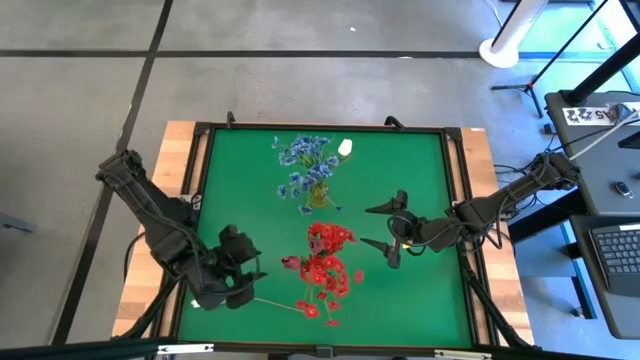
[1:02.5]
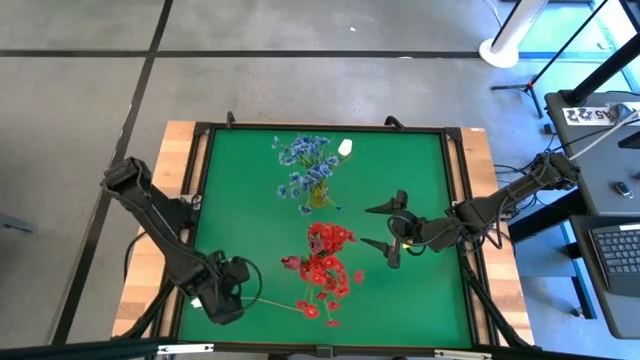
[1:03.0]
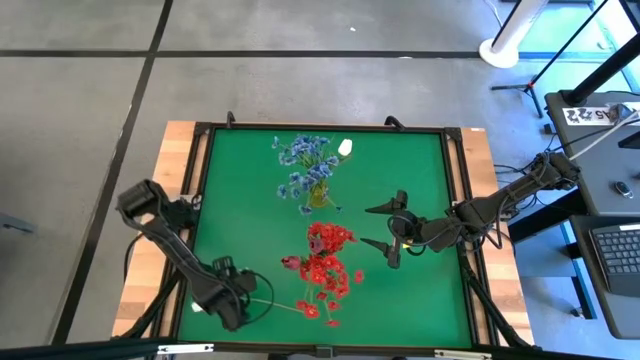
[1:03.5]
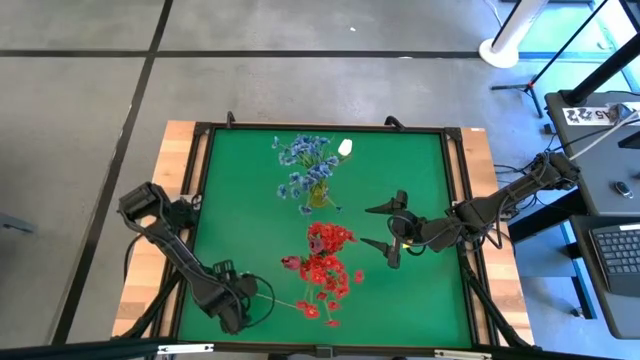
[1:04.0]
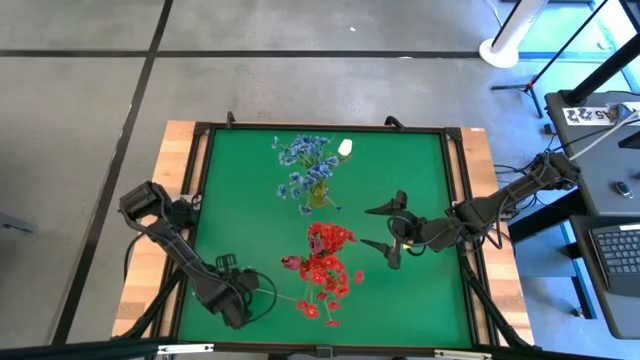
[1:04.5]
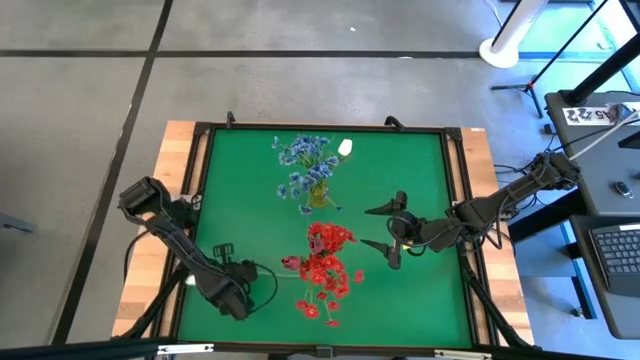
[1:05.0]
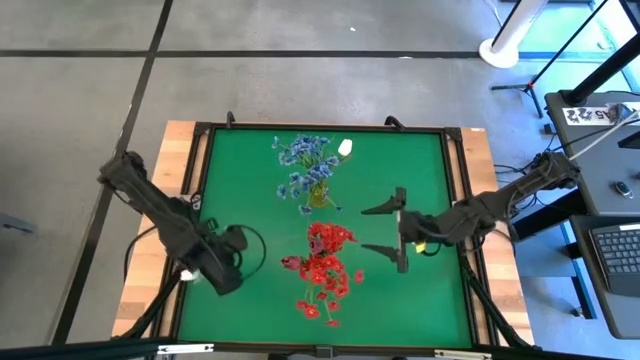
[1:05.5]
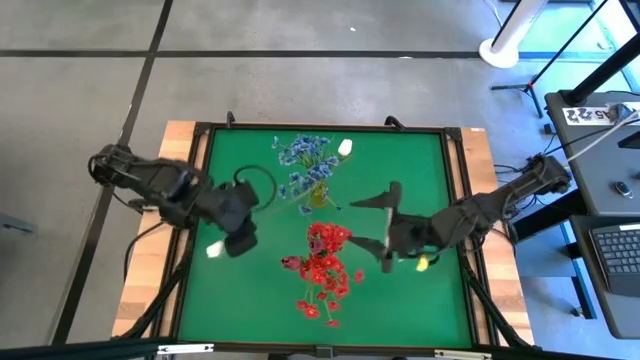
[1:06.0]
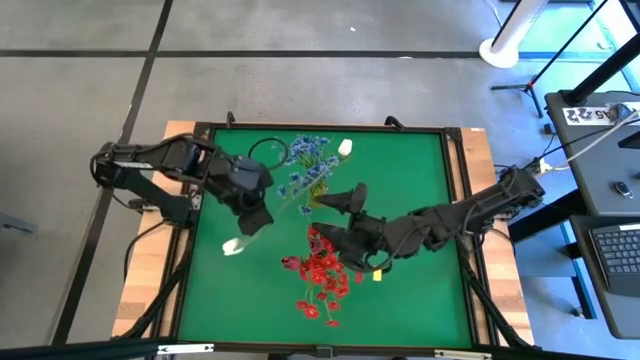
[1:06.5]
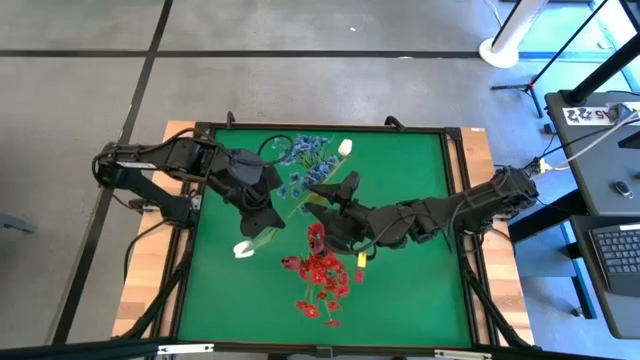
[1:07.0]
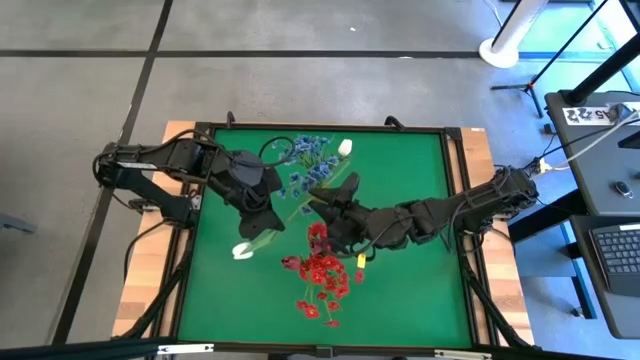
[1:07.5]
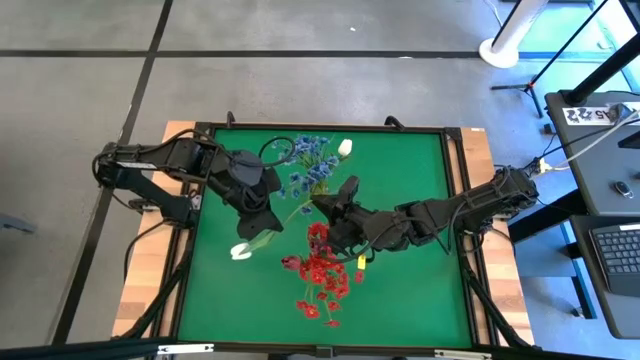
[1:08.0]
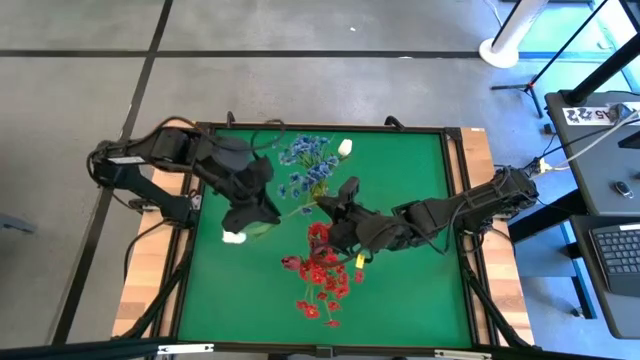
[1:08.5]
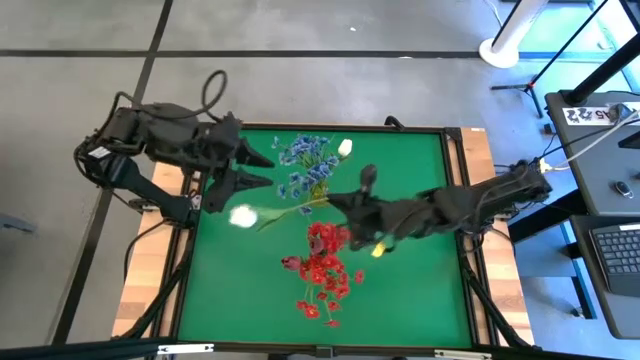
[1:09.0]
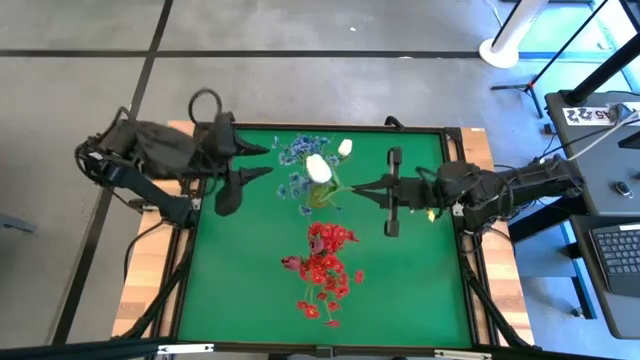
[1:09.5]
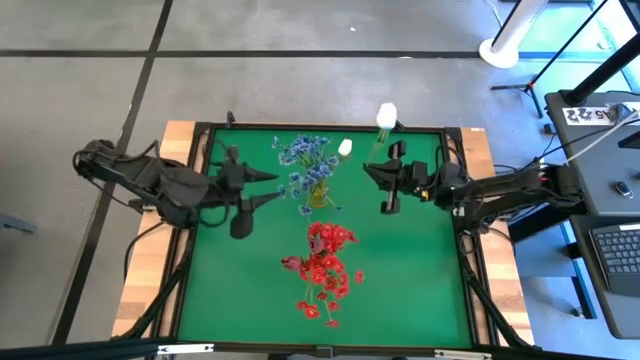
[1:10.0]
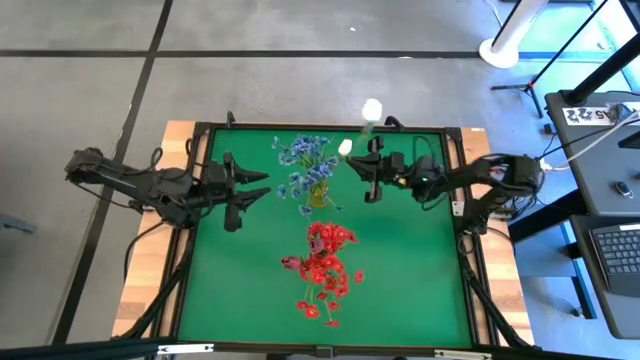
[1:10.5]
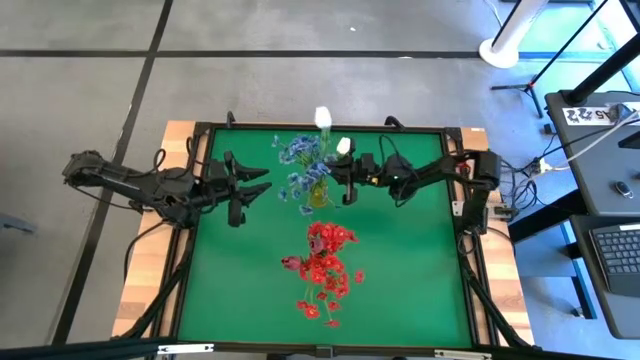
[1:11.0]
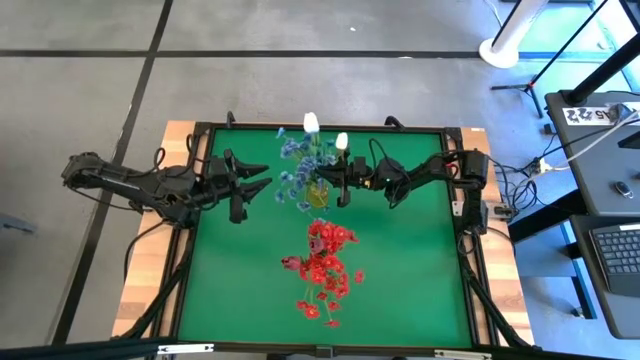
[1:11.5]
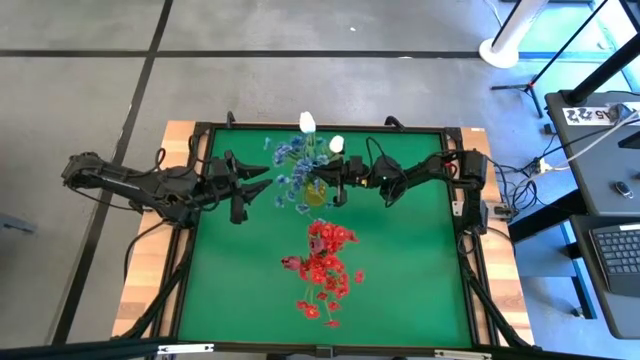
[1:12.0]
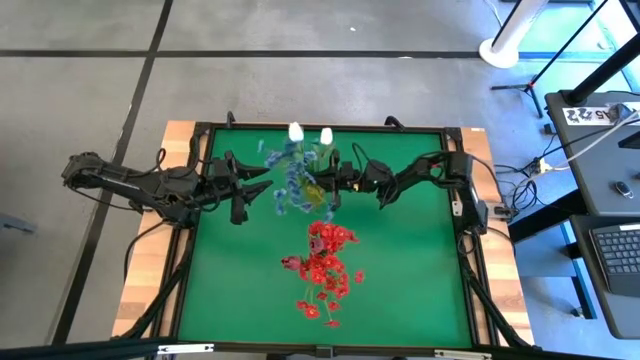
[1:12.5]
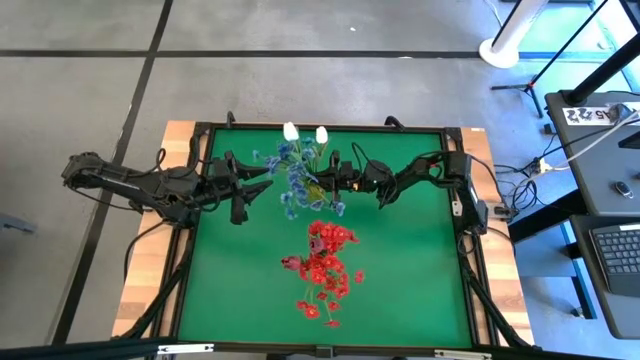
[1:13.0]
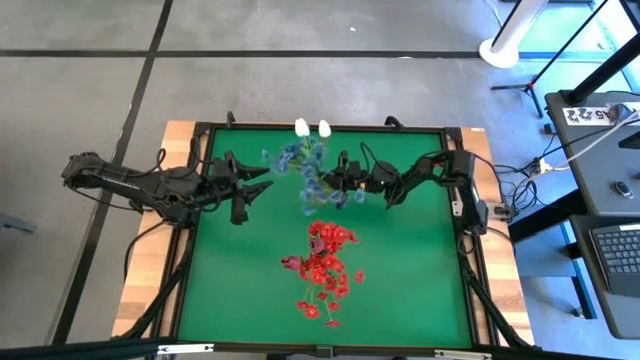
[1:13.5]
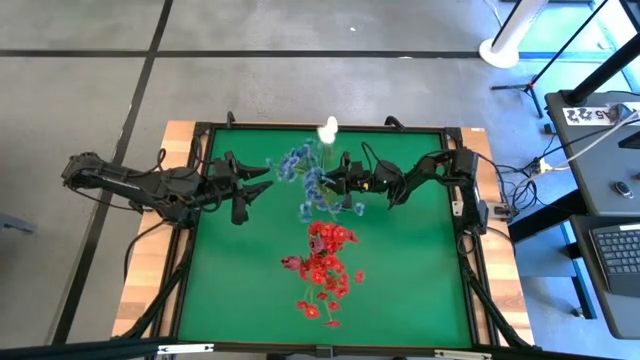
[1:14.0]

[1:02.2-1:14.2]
Task: Sort flowers into vase by color
Put the white flower into the yellow flower vase

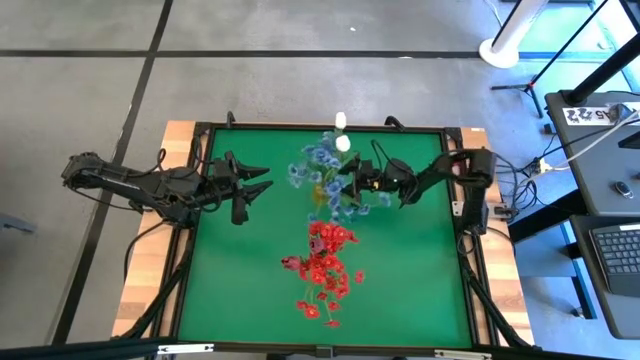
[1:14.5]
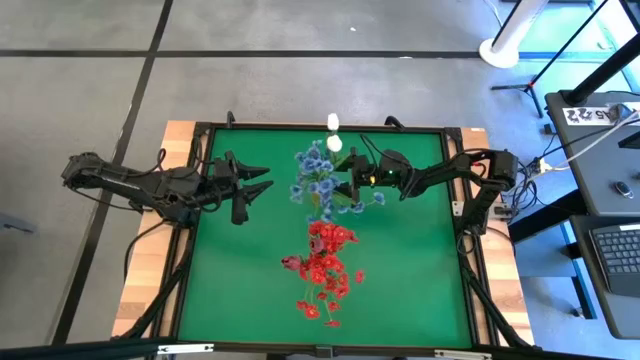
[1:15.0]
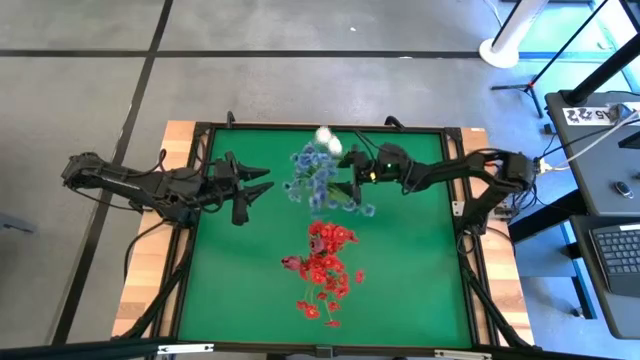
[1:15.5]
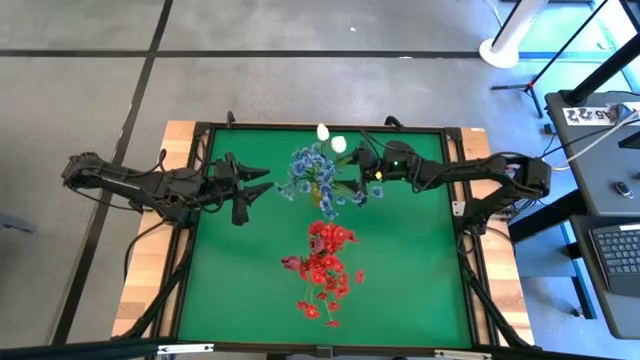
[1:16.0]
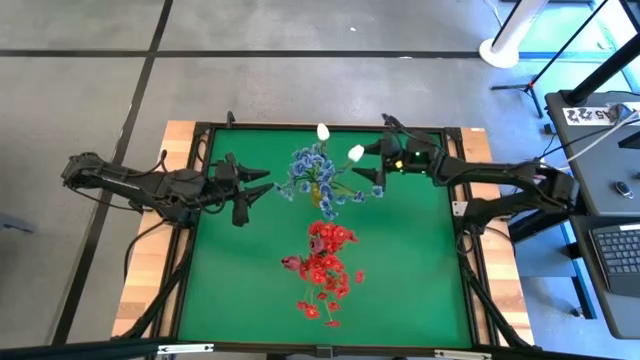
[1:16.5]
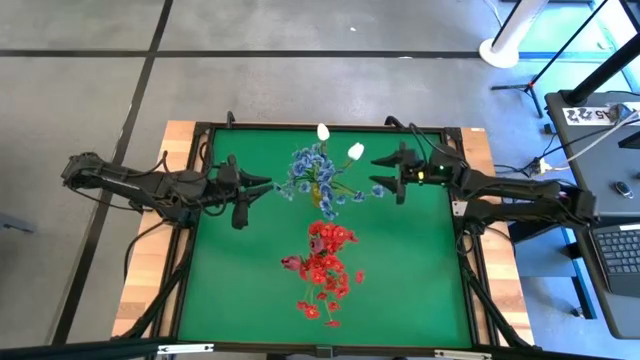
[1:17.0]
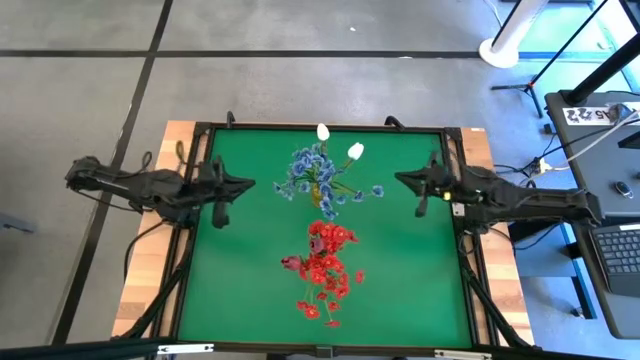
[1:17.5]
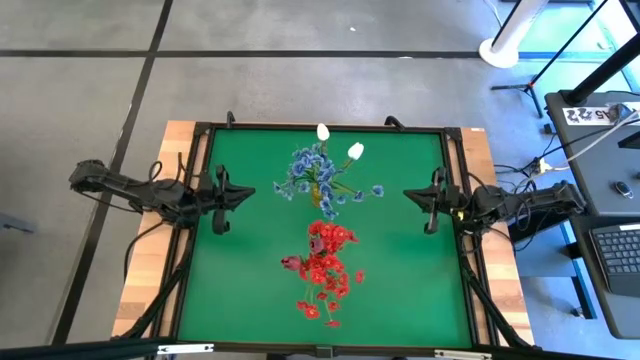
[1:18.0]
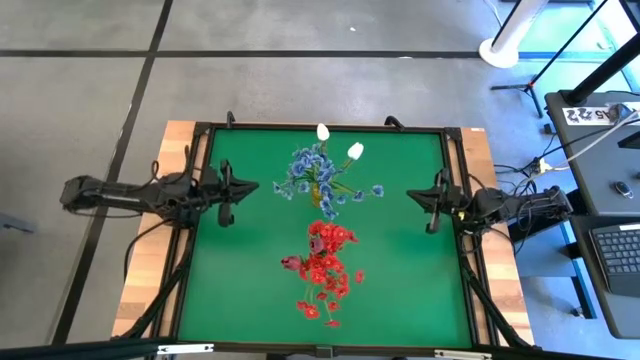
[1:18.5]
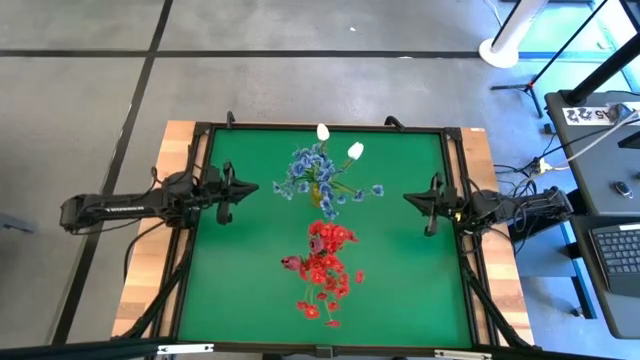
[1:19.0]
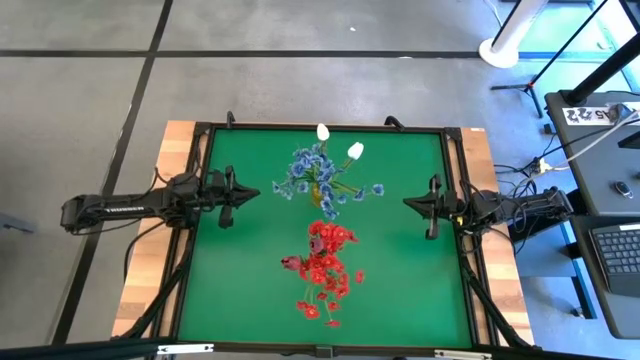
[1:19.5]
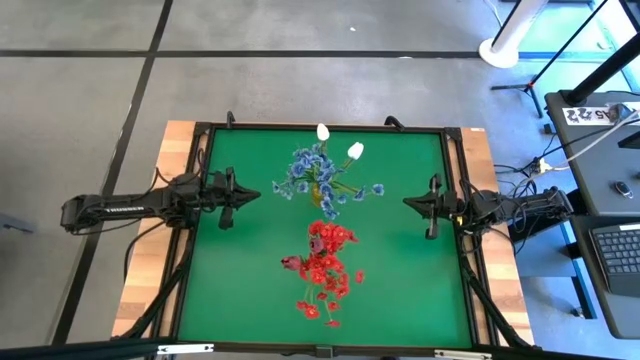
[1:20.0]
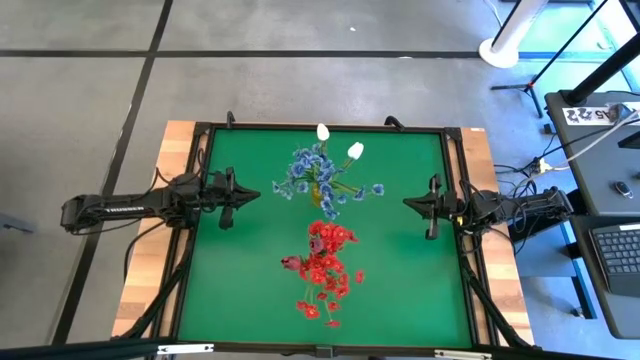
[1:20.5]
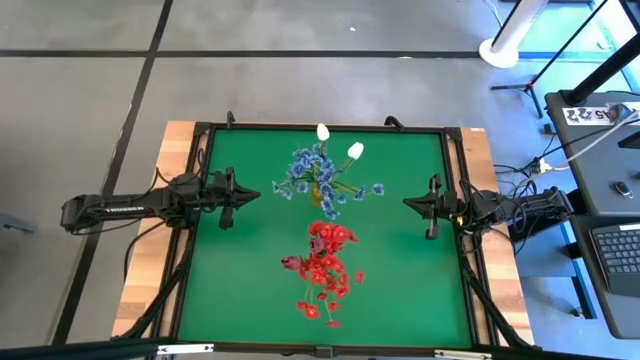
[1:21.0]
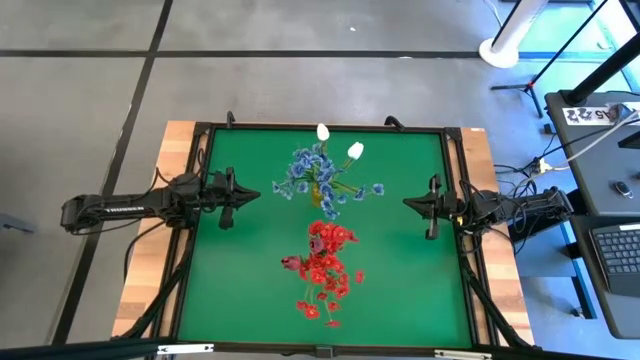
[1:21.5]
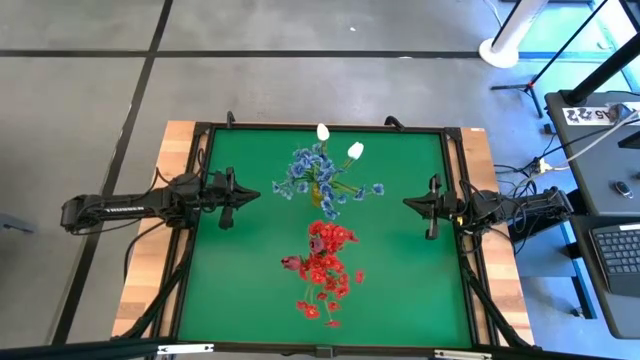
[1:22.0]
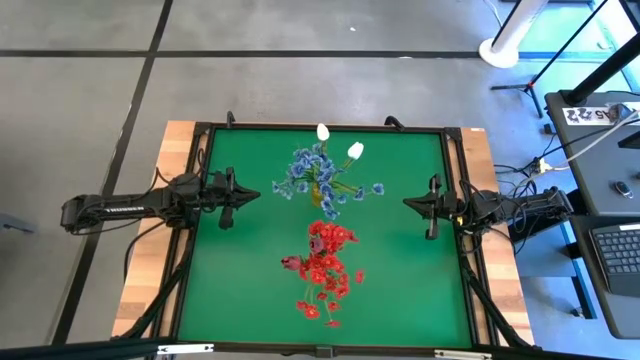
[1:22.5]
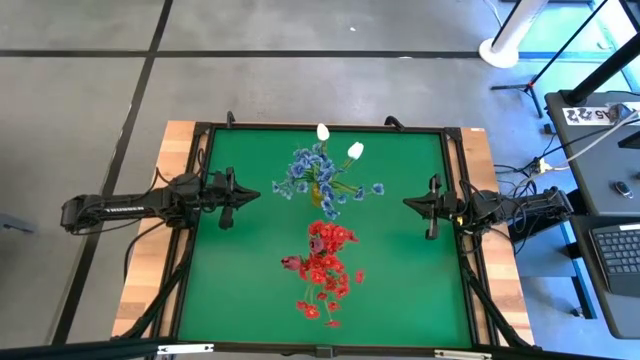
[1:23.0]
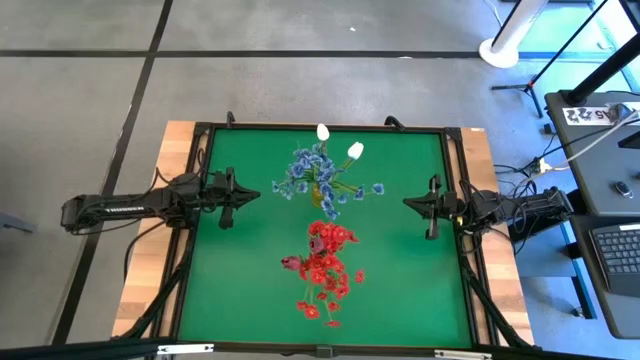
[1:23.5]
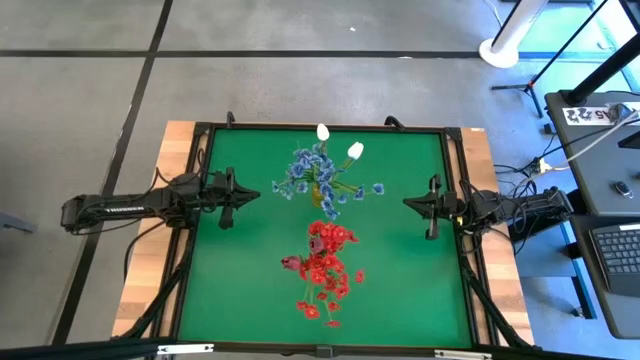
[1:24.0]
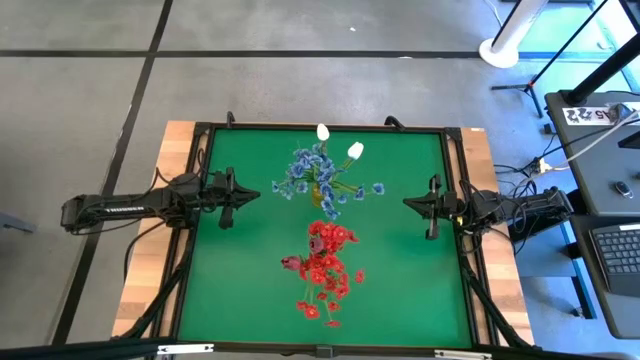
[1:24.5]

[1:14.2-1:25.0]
Return to Home Position
